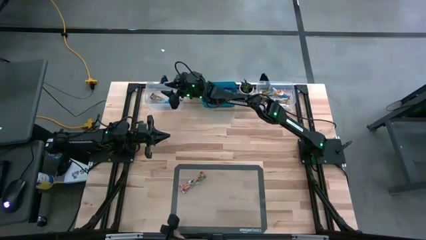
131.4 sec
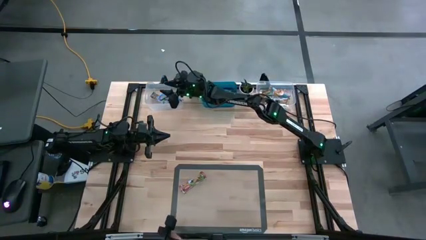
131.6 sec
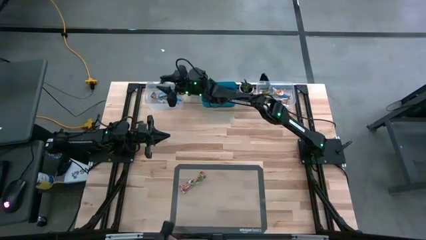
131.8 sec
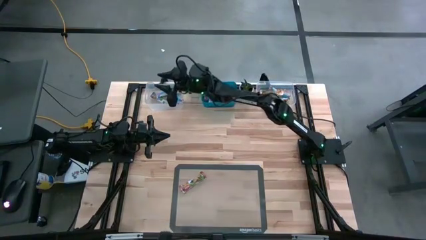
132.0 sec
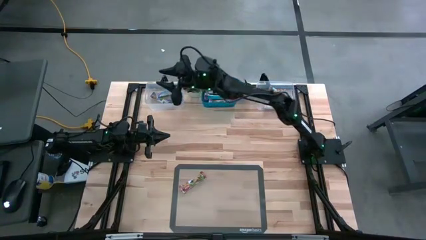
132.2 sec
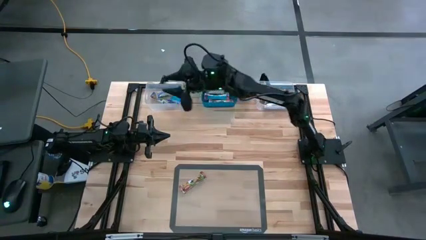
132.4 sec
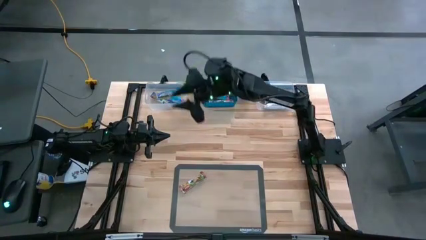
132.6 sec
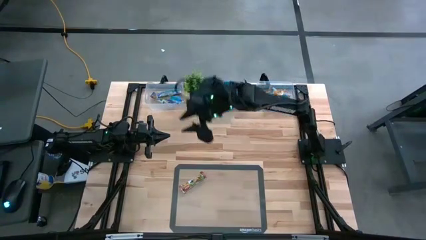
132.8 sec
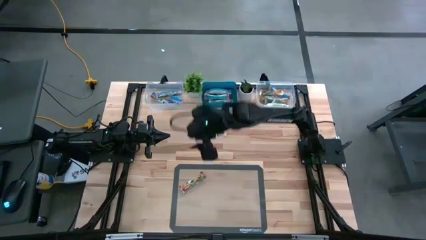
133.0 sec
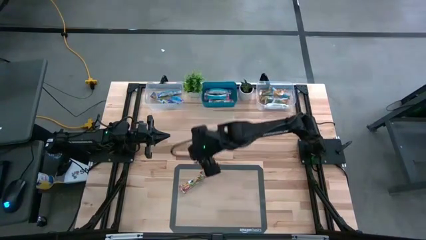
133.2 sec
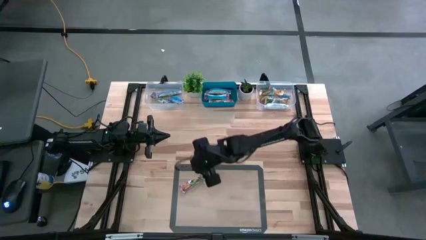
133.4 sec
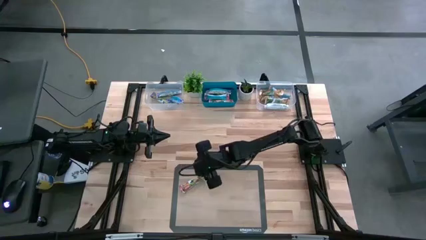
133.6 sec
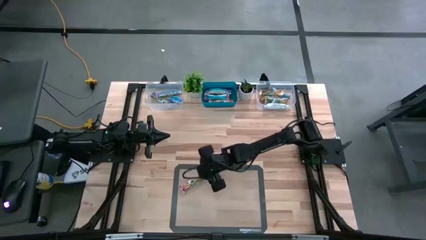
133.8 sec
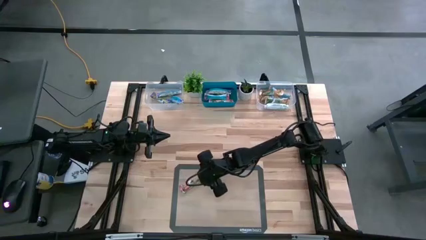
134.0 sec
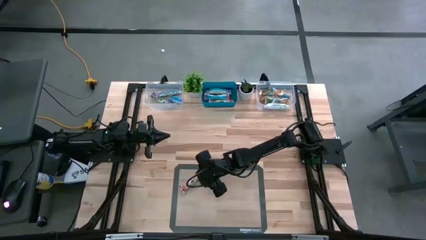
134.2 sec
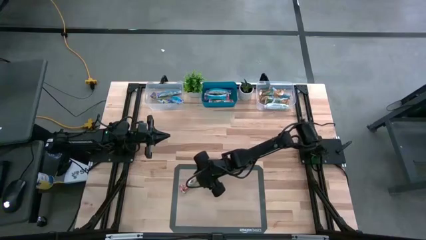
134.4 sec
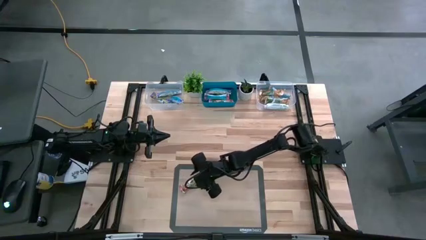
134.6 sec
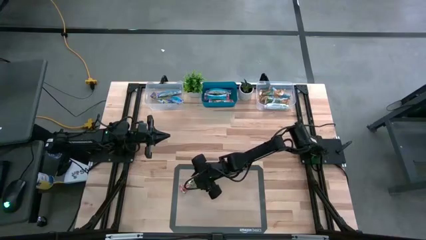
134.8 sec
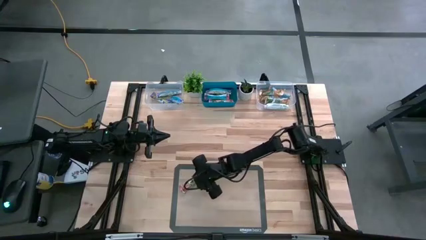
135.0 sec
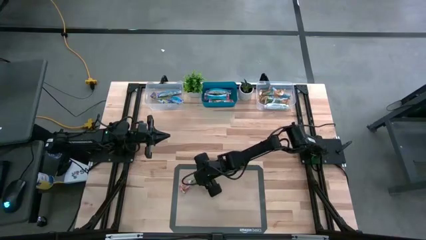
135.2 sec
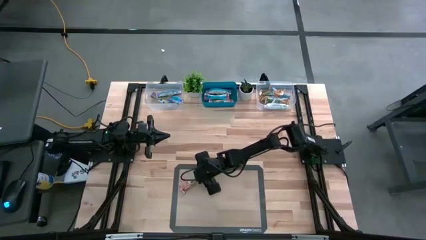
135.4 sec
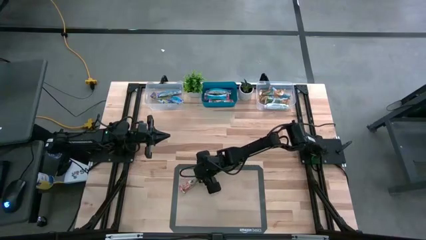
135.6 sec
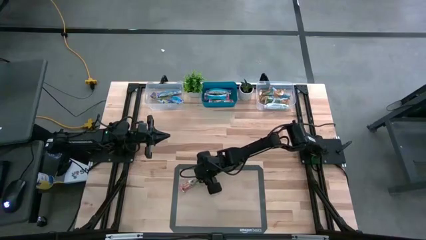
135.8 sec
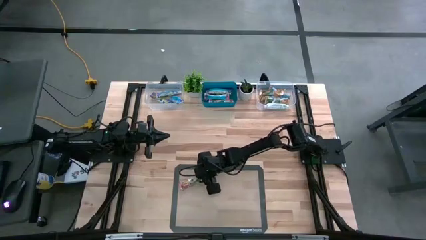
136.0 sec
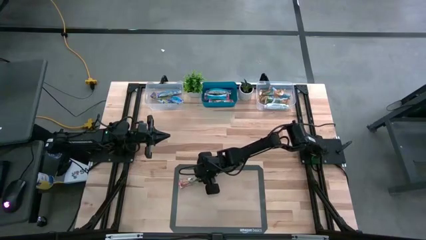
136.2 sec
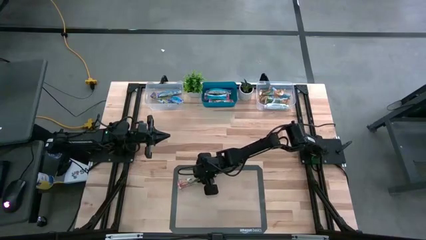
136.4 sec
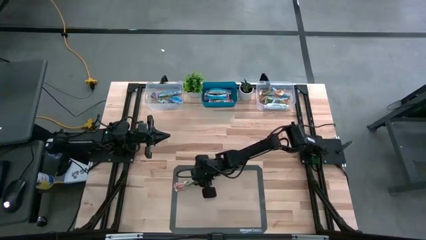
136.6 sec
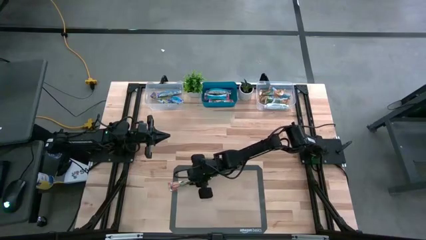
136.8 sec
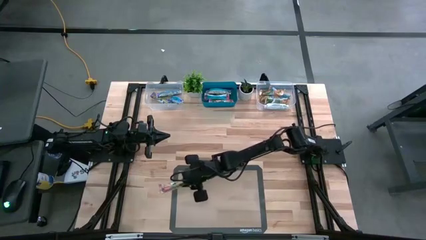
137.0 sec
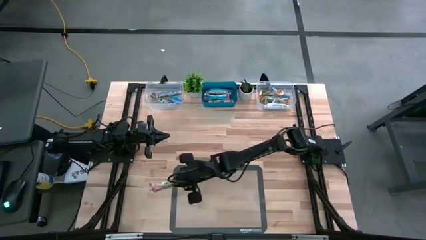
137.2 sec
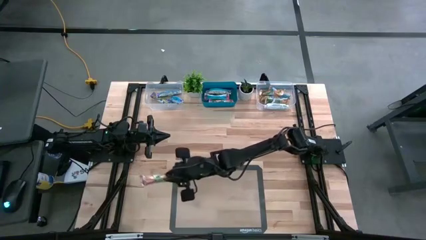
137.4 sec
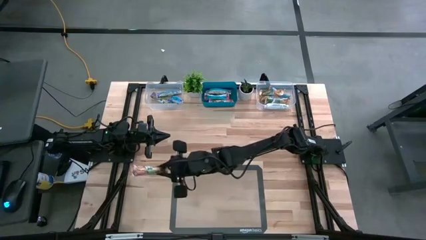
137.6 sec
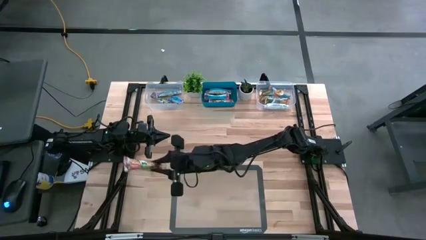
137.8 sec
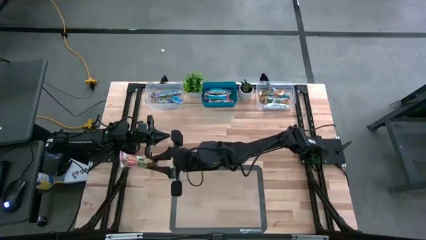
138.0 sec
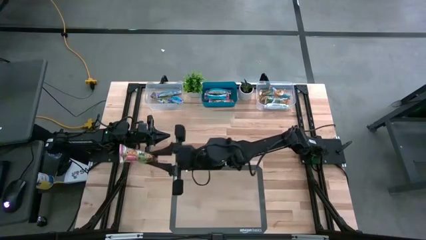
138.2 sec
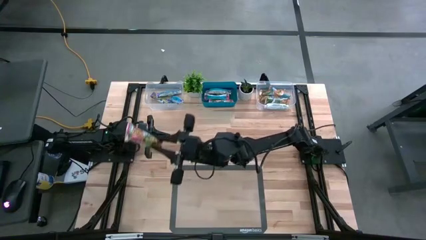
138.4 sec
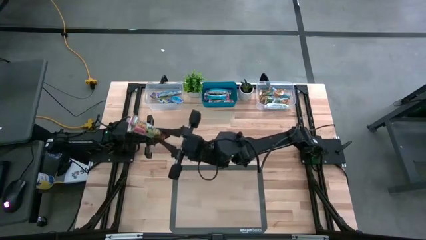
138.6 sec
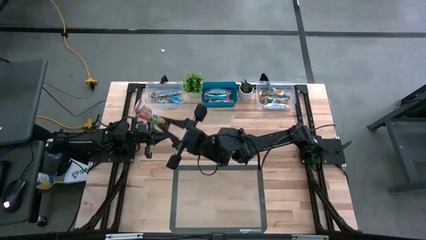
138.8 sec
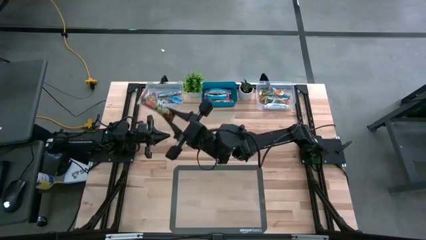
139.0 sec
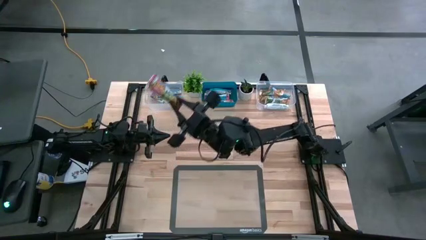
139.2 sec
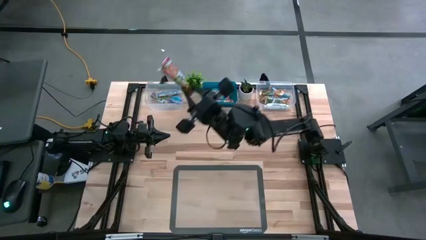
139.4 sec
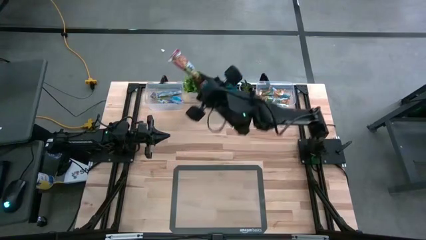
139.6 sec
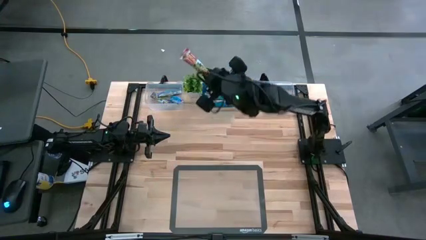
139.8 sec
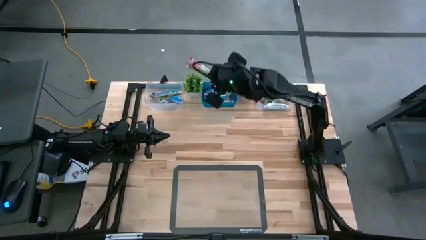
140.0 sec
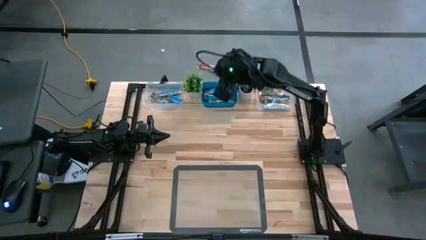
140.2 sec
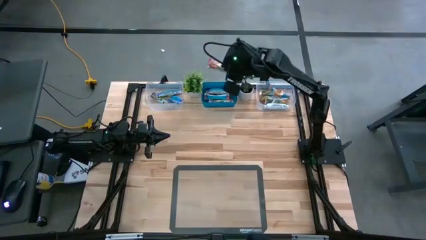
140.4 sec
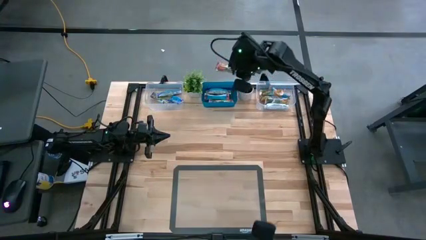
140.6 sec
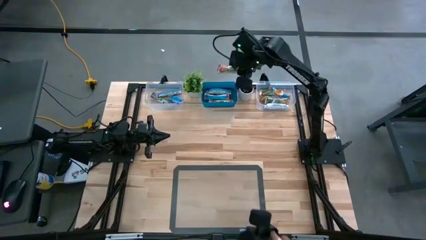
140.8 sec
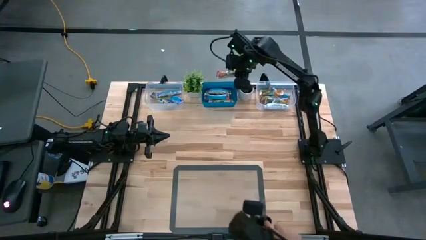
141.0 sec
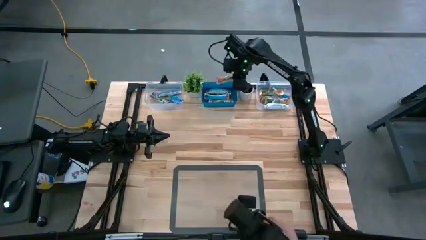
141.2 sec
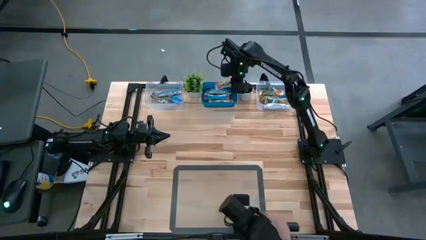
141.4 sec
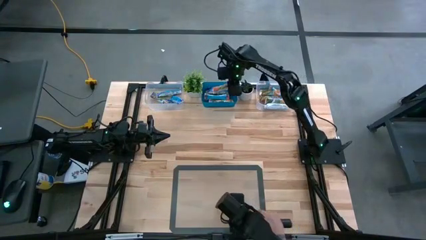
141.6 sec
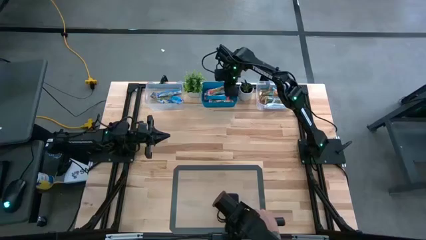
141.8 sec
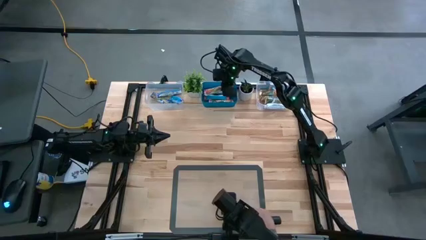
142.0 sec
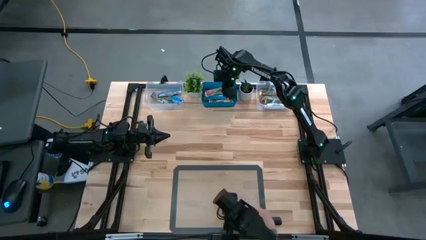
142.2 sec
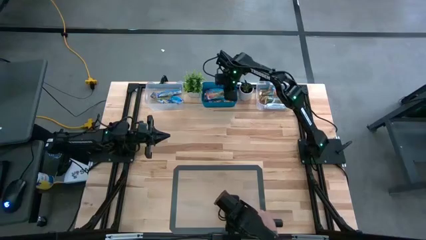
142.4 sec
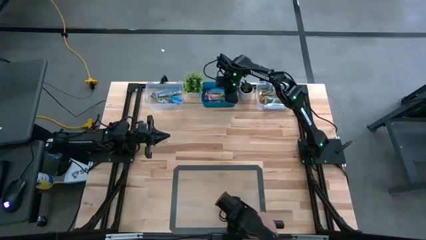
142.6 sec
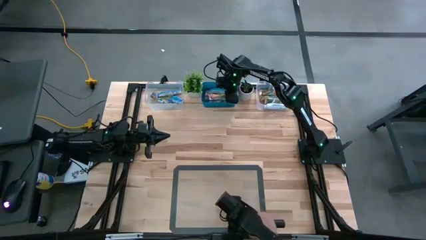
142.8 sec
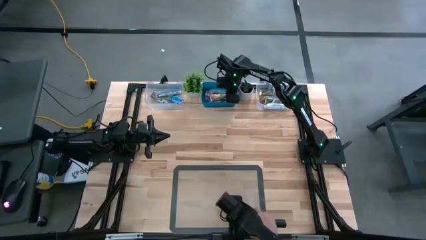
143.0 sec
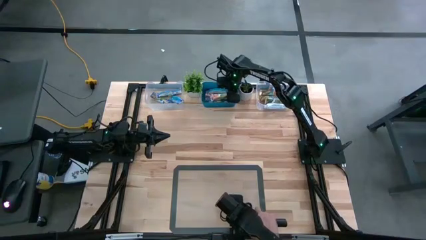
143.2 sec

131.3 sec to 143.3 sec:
Task: Pick and place Granola Bars by type
Put the red granola bar into the blue bin

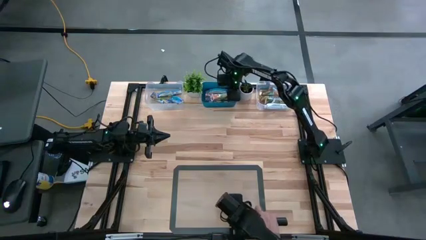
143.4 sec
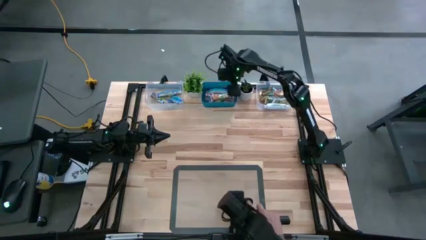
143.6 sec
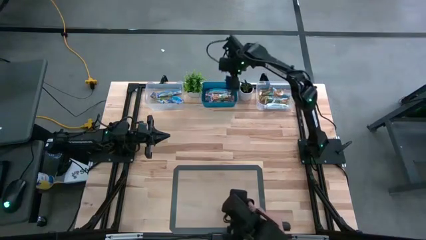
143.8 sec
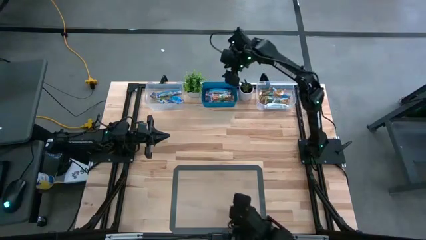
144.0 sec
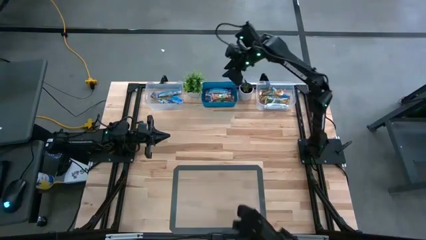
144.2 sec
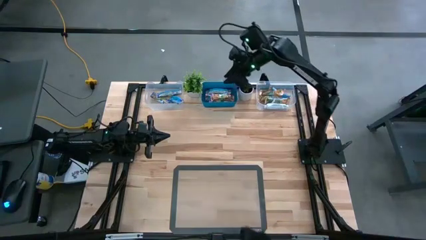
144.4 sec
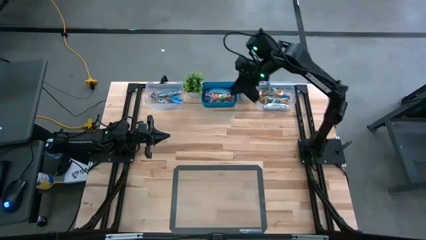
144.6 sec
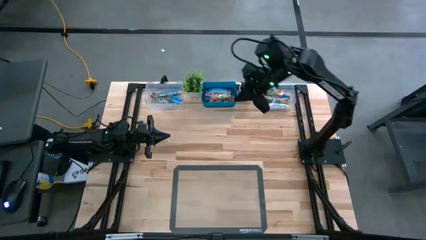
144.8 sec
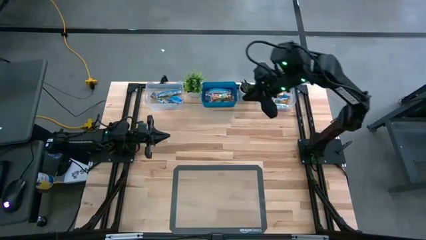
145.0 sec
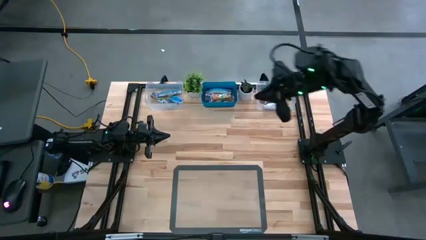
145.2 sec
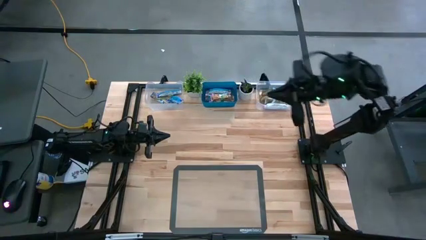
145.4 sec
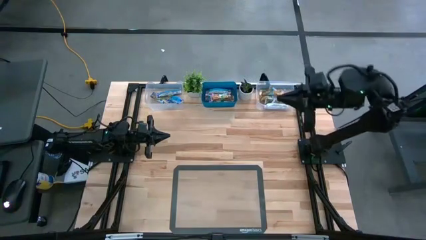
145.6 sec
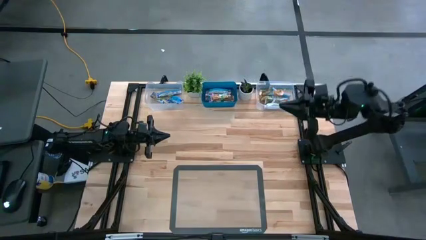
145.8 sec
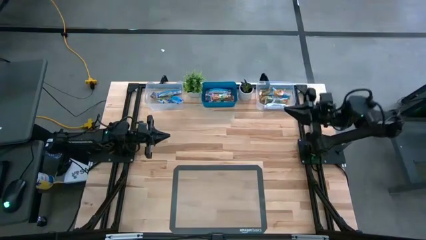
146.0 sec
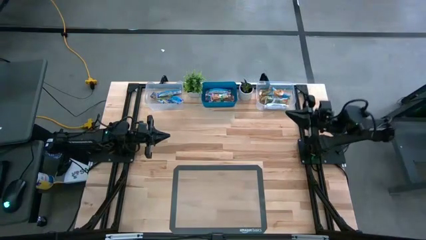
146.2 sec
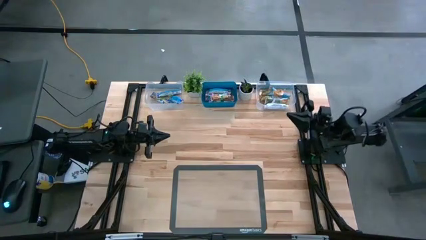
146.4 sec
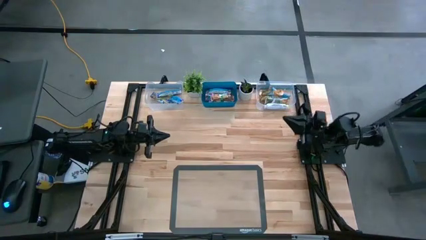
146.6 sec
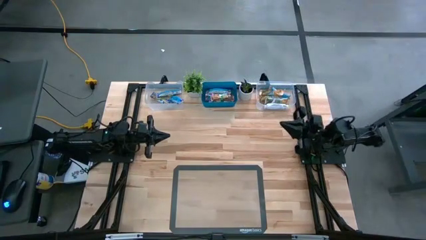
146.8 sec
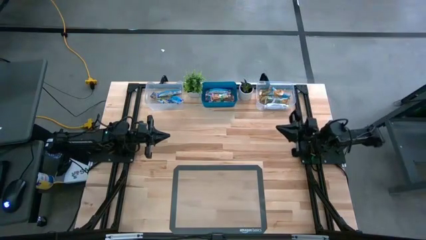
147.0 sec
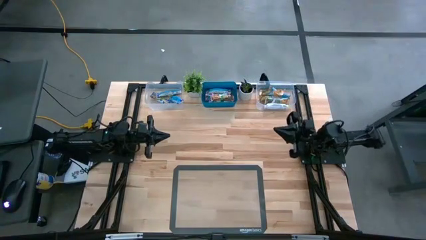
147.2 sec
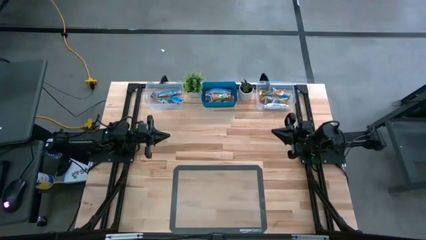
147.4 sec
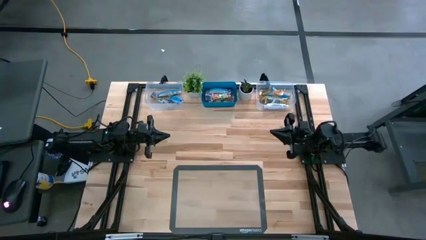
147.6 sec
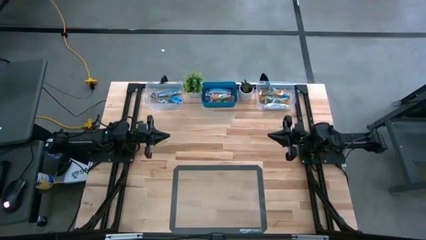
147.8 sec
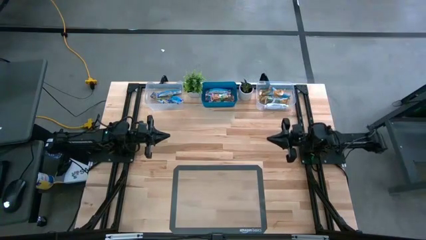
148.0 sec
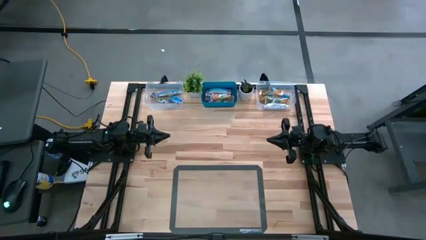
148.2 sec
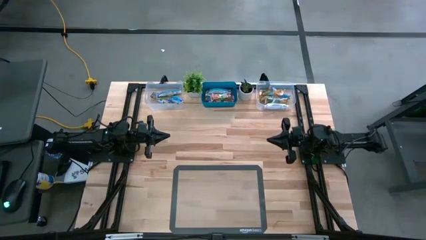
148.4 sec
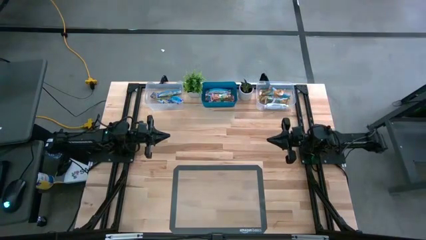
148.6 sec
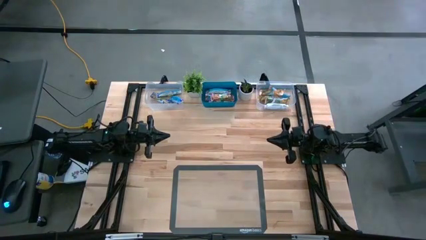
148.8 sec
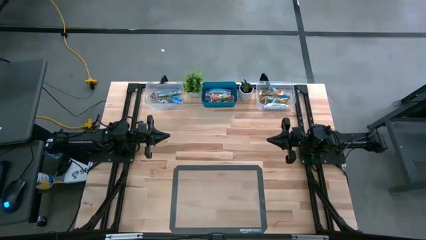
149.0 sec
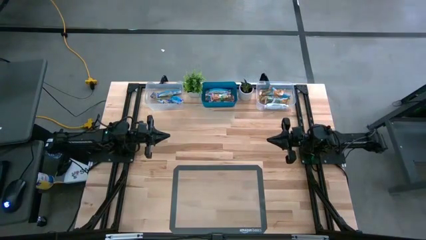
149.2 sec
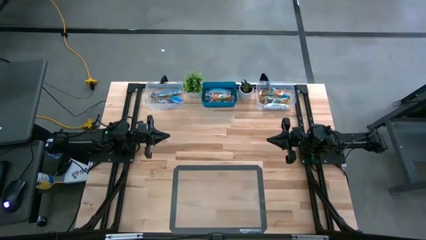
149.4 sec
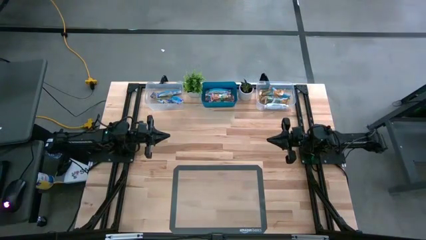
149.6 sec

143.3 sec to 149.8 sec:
Return to Home Position
